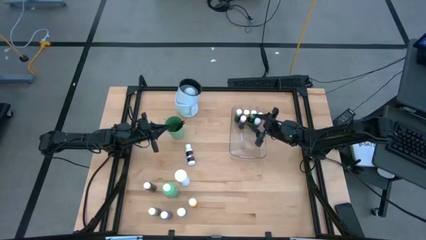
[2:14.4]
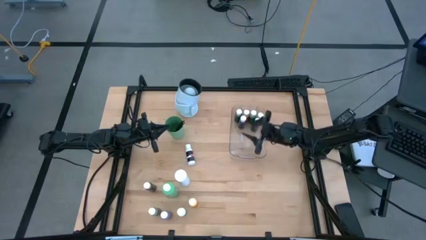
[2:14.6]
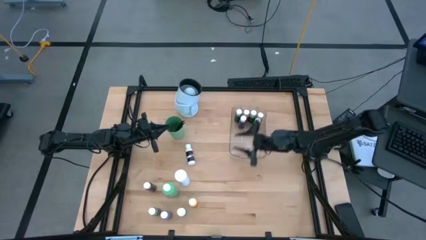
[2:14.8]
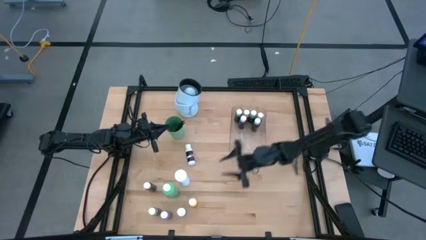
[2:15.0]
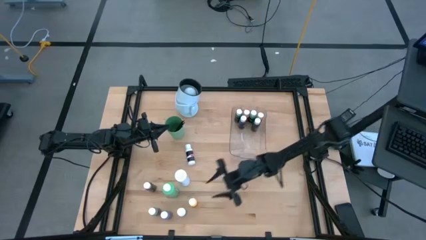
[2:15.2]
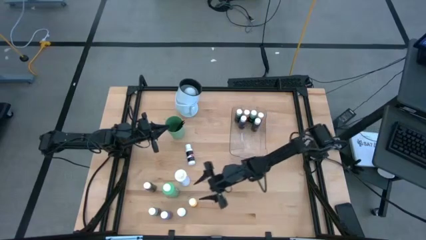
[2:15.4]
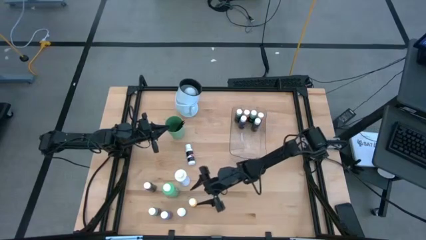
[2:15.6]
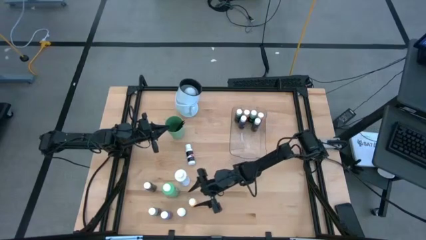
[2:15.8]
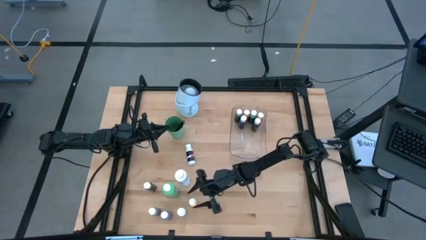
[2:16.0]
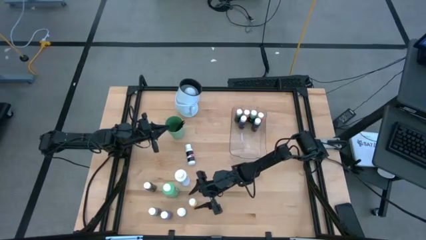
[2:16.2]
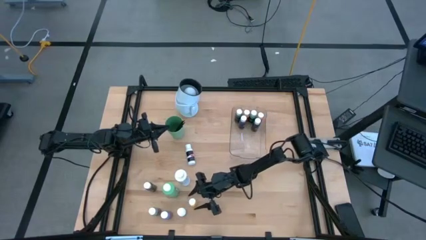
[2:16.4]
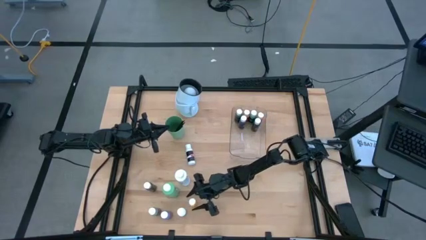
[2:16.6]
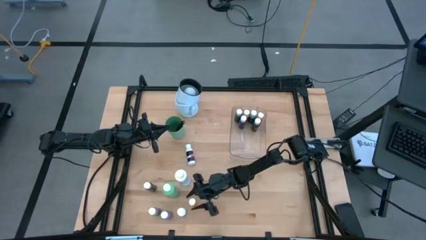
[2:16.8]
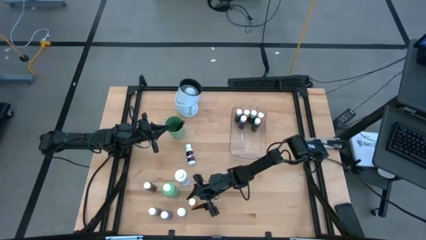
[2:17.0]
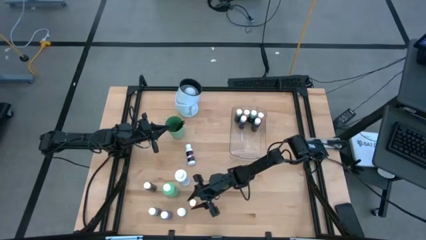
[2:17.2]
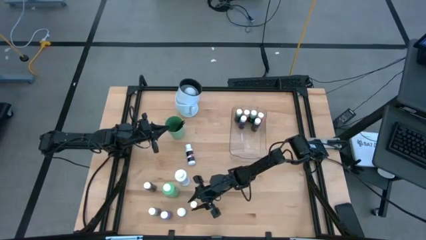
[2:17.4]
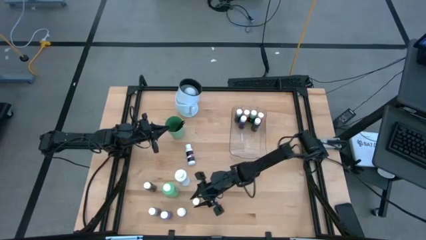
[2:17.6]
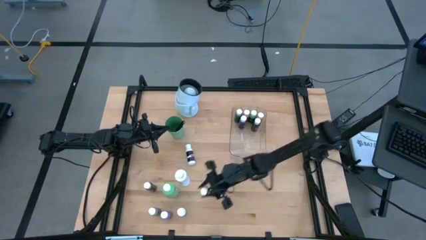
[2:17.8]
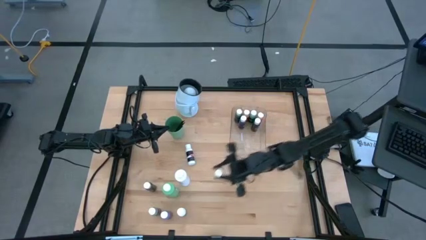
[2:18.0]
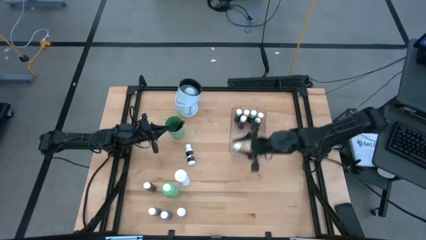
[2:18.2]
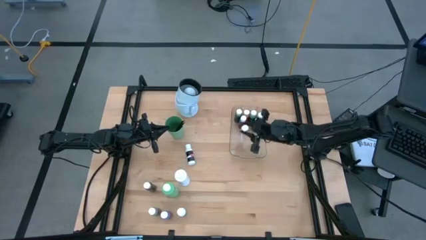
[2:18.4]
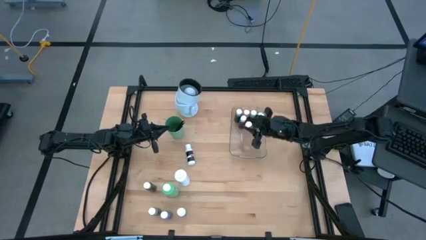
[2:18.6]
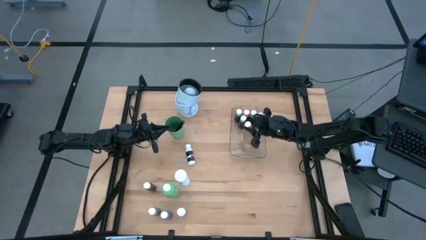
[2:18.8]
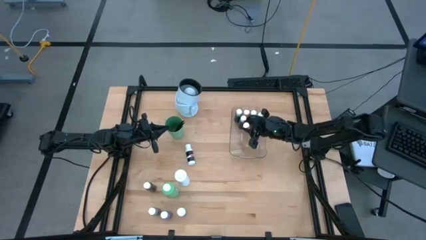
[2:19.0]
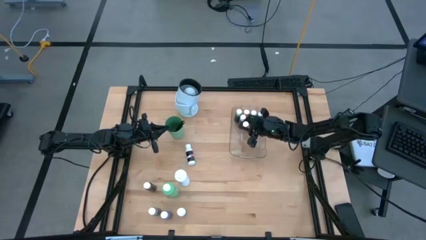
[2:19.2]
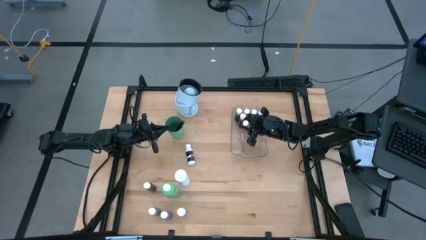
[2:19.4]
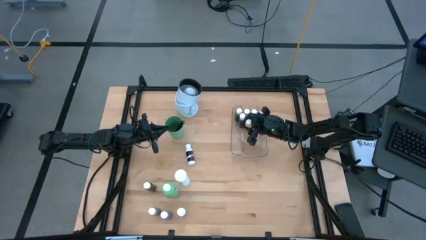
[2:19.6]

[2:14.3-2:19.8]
Task: Pick & Place Paint Supplies
Put the yellow paint bottle into the transparent bin

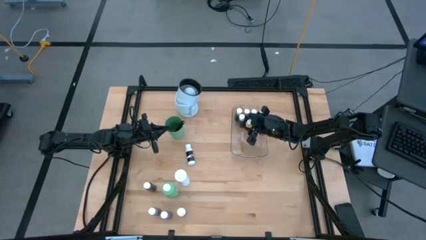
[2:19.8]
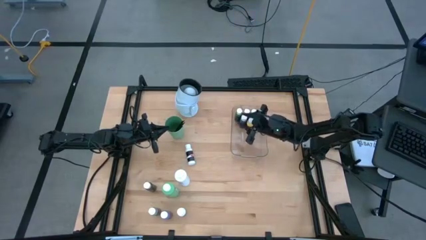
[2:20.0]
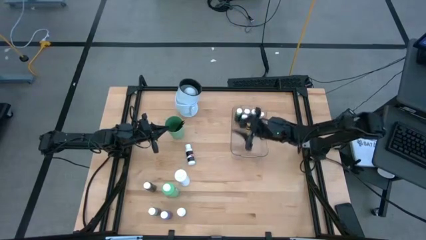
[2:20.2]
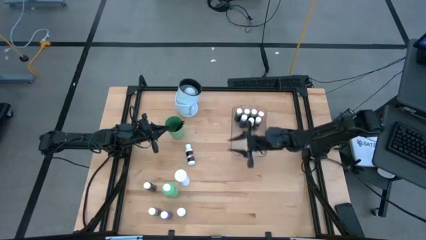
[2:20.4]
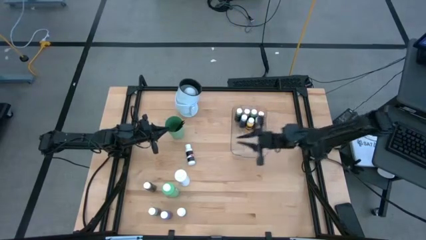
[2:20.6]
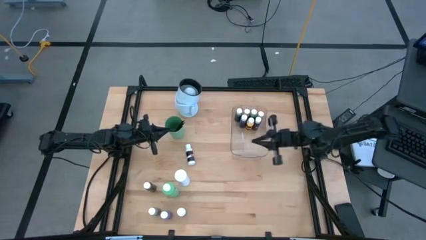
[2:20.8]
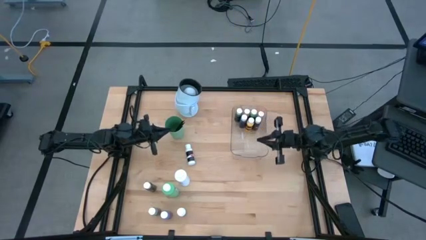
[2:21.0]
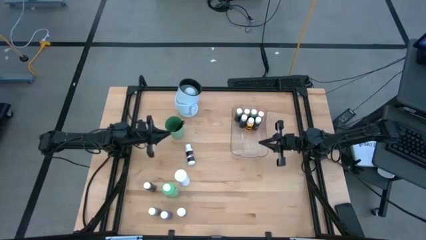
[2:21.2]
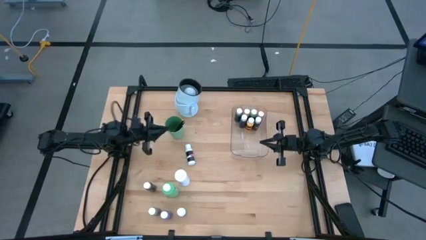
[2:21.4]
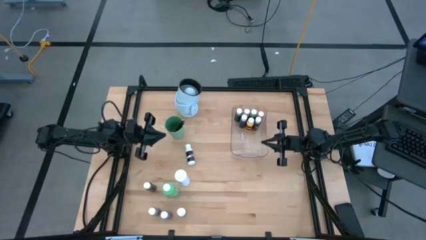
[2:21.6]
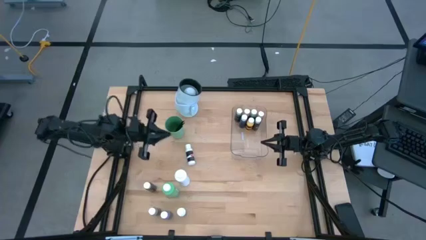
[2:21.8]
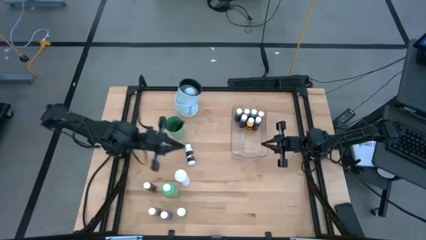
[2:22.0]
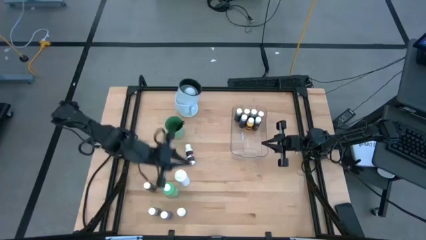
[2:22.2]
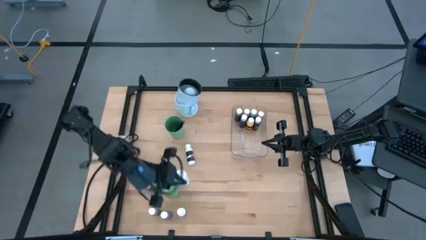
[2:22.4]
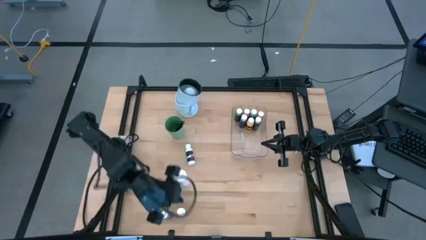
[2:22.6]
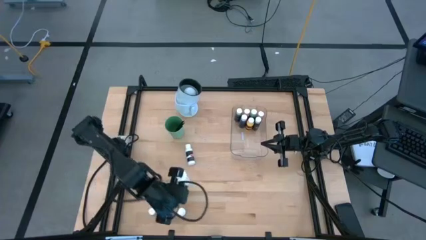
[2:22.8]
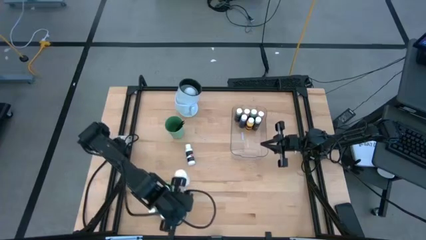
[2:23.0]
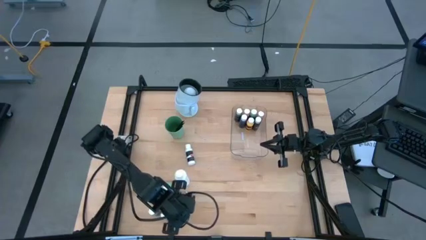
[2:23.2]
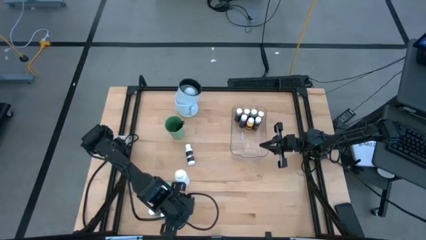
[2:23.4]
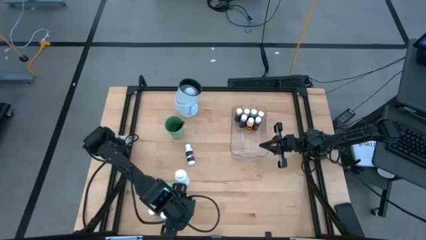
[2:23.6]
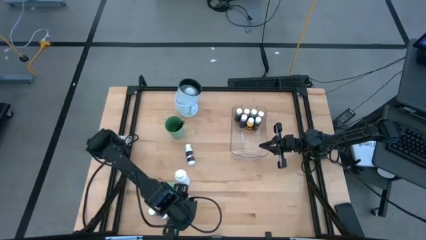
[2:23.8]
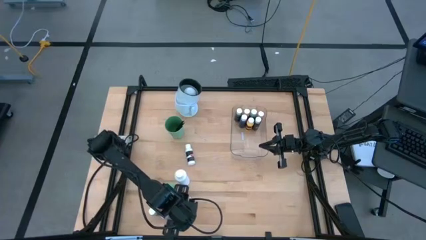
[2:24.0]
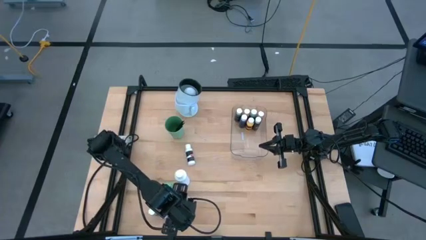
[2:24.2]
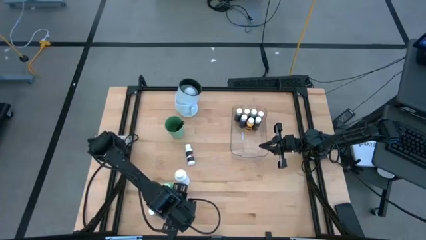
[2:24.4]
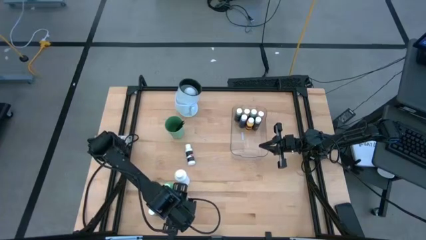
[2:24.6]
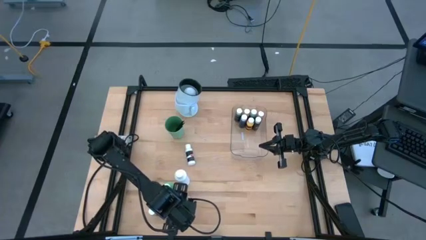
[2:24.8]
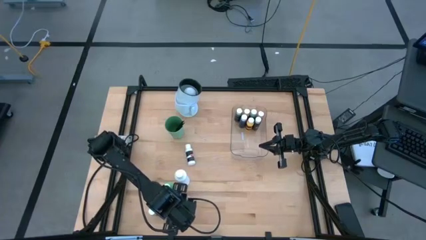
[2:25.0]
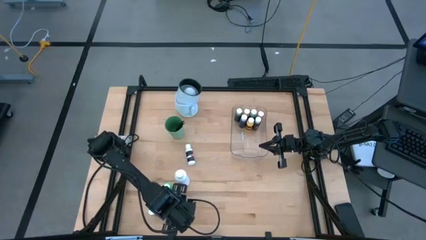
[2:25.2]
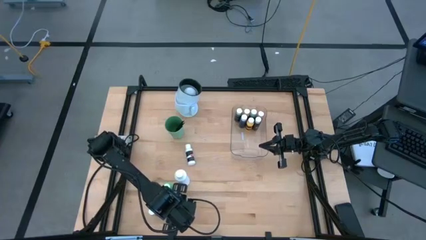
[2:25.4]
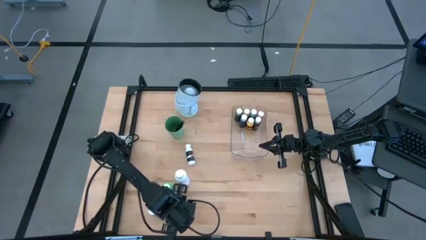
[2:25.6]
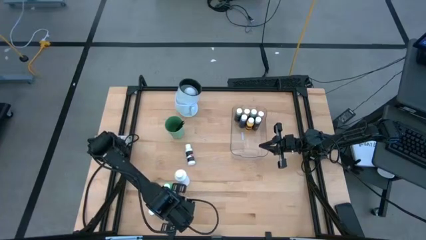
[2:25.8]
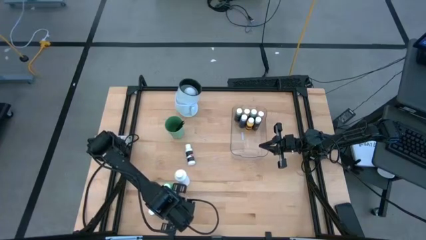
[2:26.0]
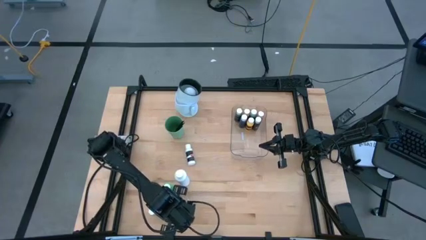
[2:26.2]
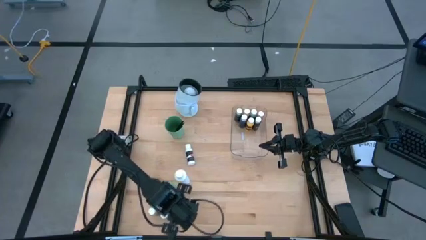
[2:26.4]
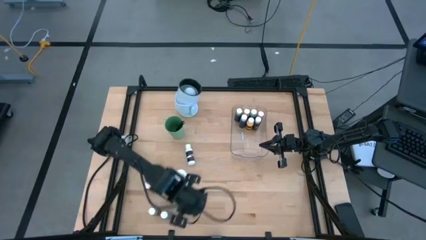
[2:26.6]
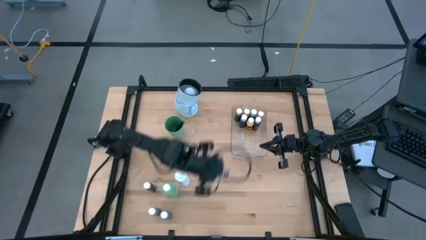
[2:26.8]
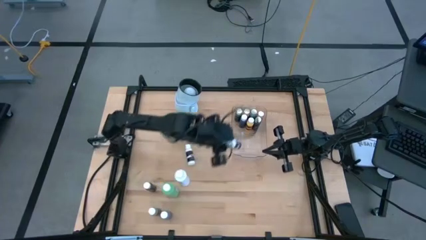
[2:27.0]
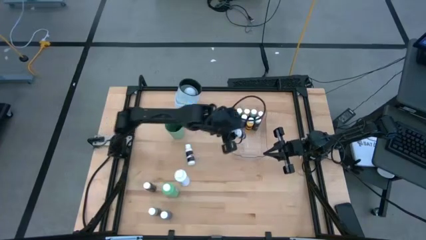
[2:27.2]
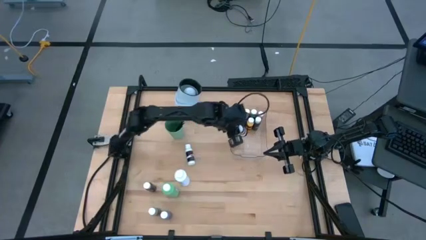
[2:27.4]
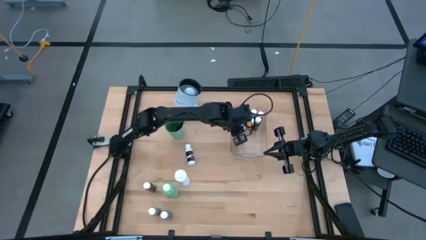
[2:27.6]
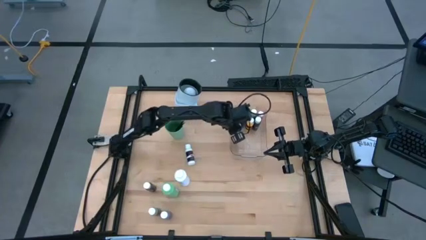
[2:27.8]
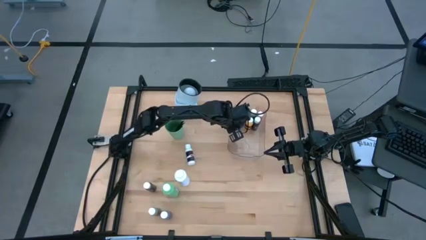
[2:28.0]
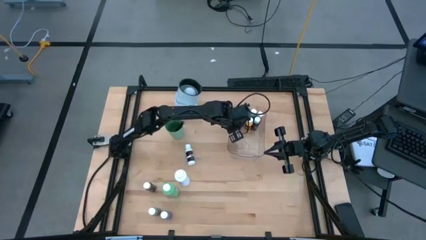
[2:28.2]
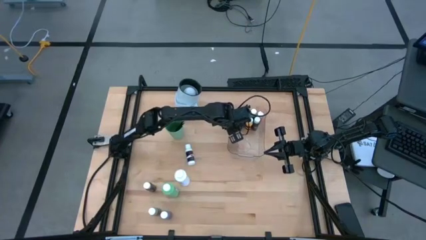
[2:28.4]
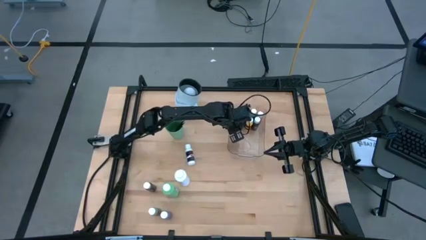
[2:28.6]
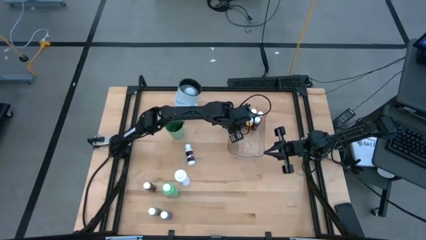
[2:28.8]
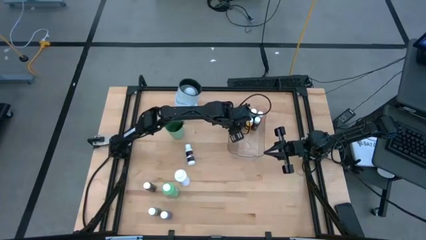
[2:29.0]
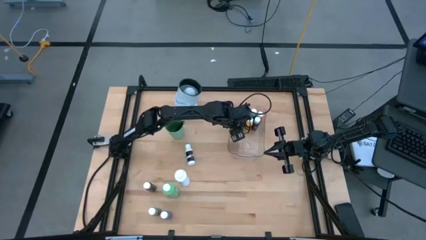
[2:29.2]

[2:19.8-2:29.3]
Put the bottom white paint bottle into the transparent bin
